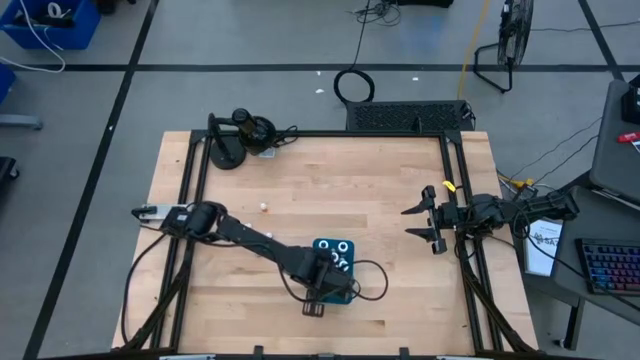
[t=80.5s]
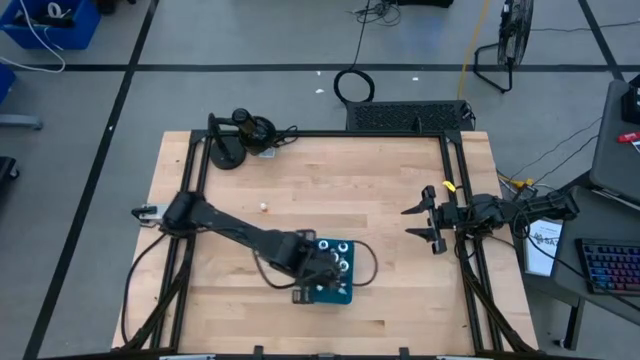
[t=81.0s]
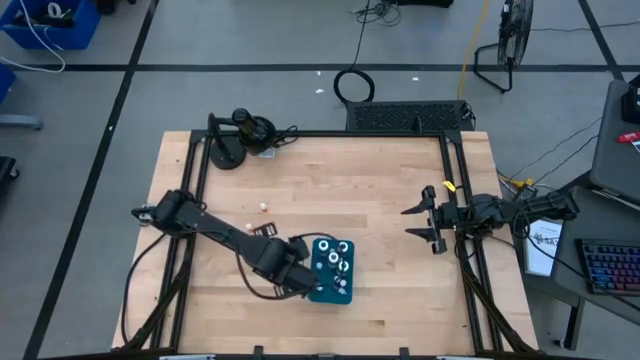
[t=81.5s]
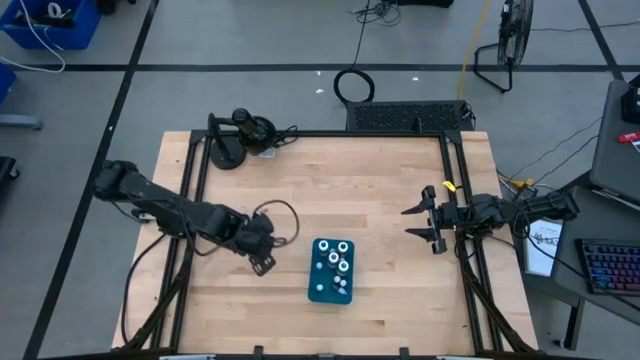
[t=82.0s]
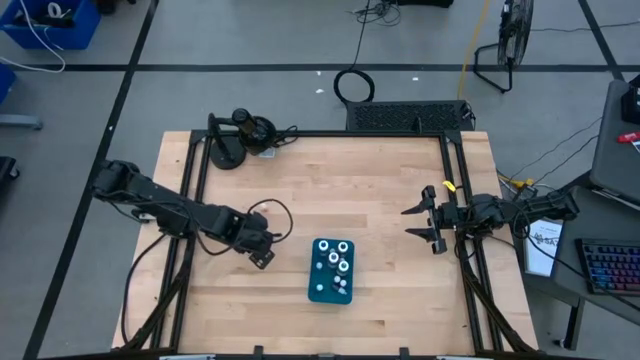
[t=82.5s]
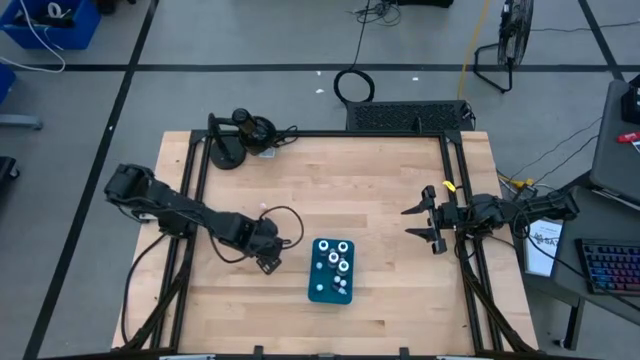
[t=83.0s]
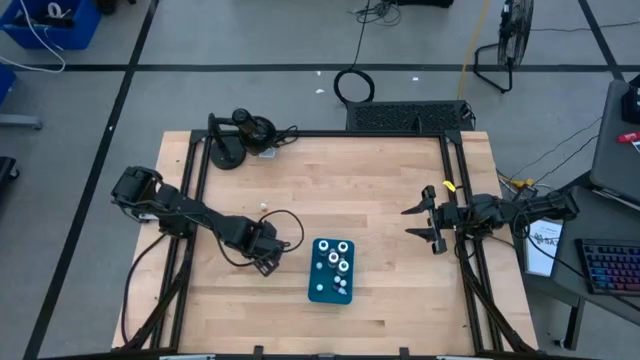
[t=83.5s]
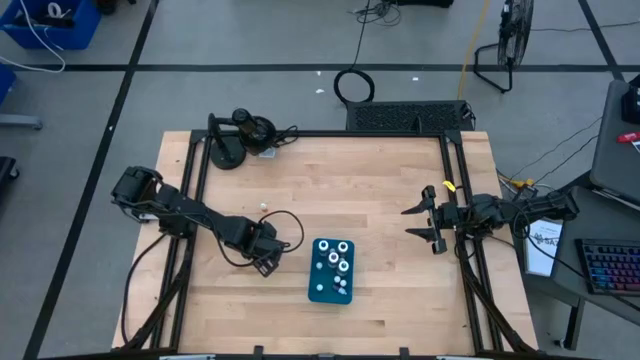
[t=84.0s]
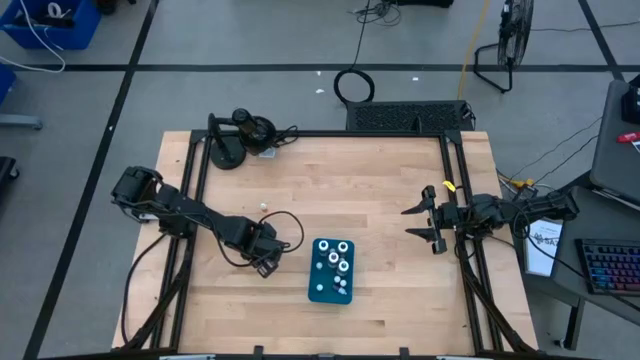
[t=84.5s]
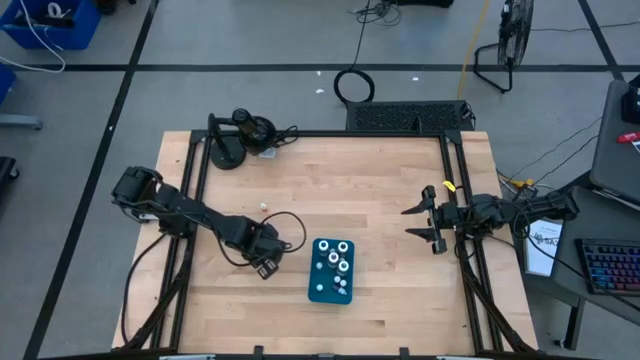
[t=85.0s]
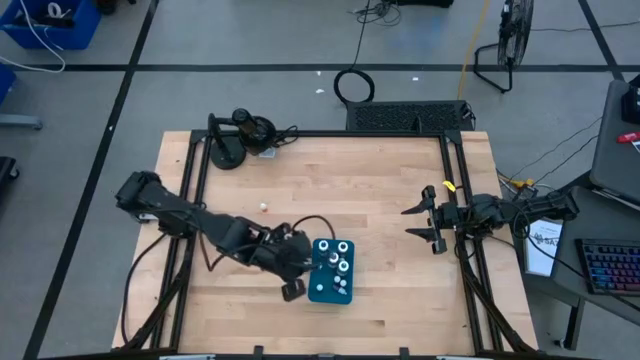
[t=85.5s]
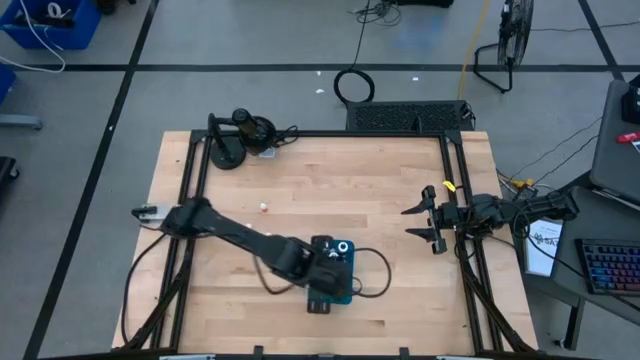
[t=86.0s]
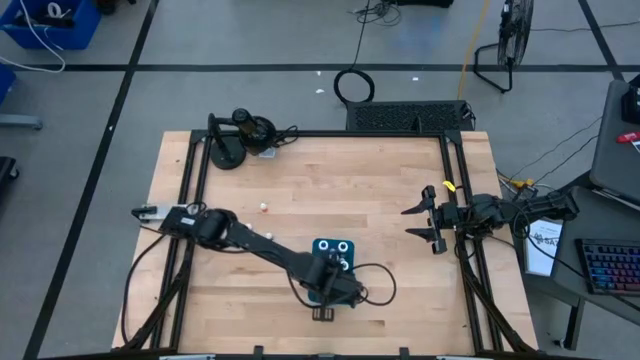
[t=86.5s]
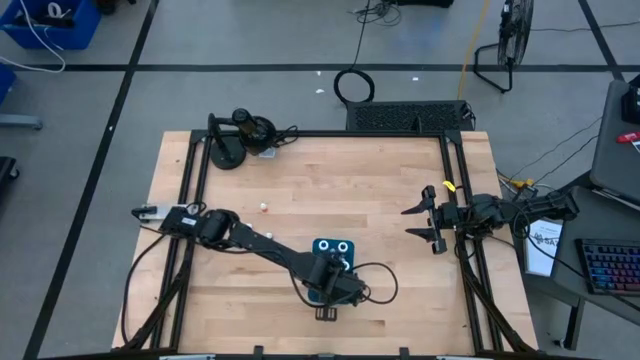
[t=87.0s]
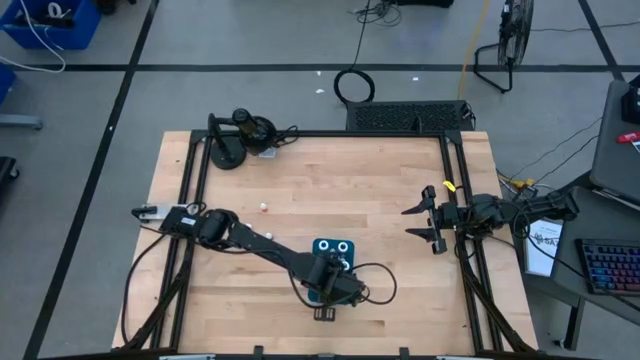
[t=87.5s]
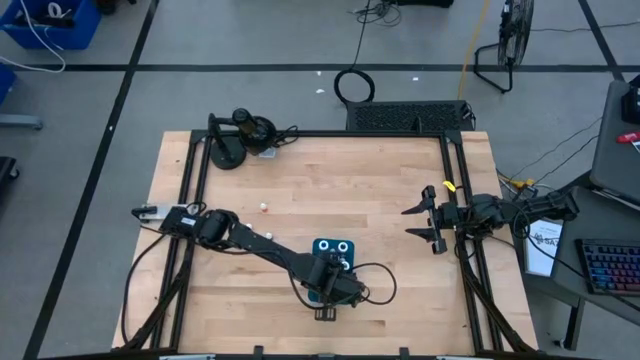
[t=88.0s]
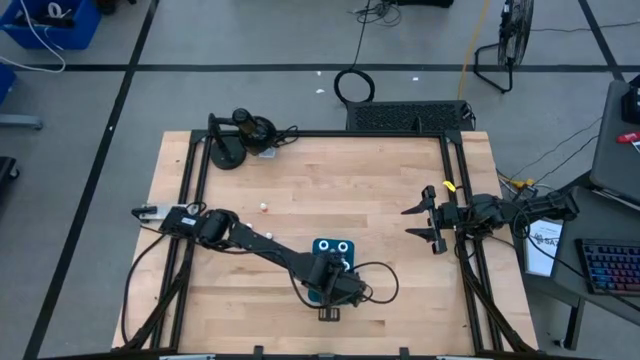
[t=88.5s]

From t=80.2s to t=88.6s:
Task: Pick & Place food coloring
Put the blue small food coloring bottle into the blue bin

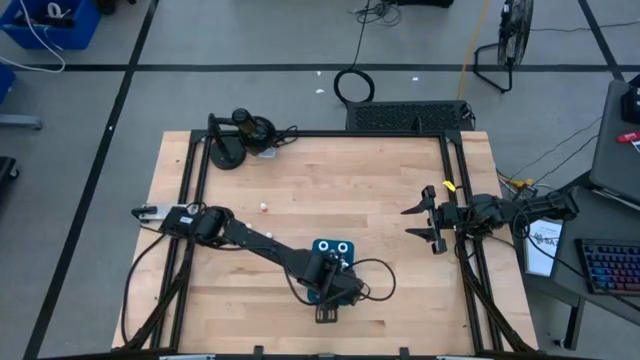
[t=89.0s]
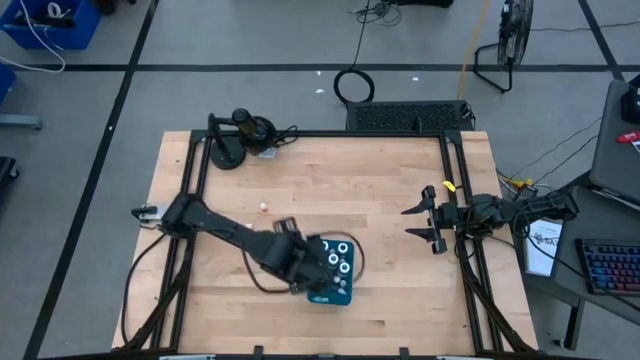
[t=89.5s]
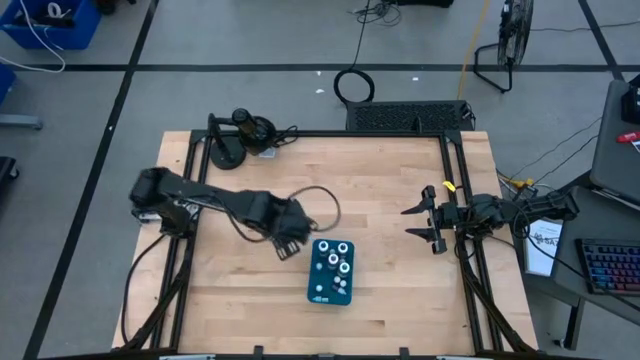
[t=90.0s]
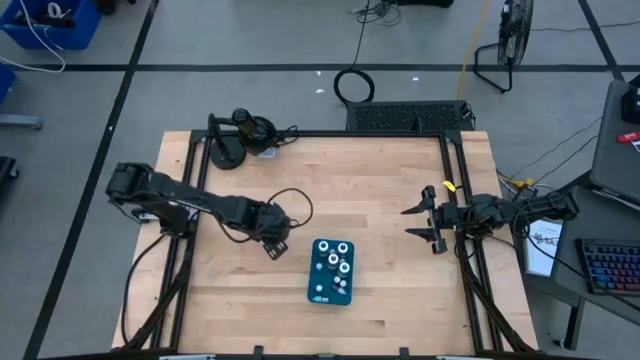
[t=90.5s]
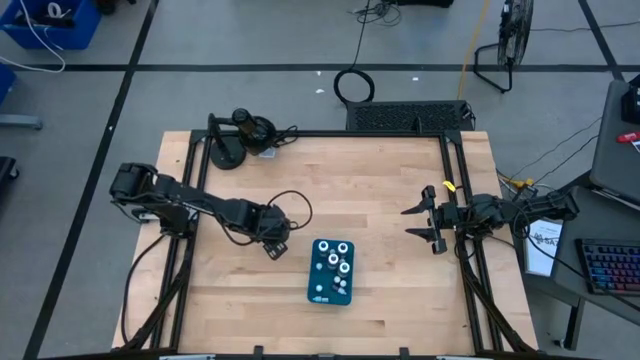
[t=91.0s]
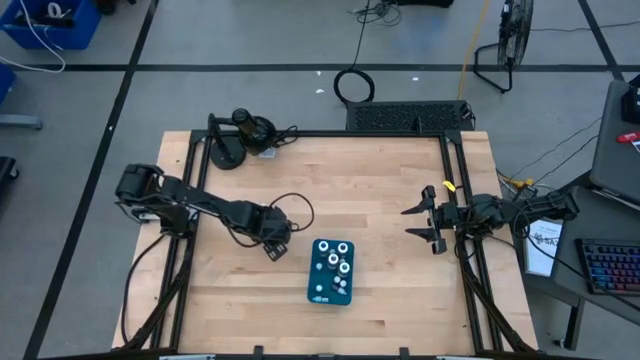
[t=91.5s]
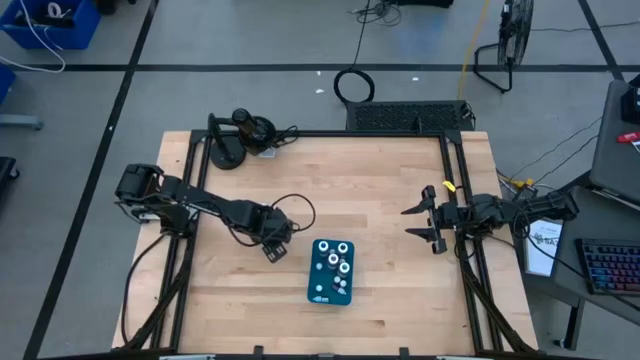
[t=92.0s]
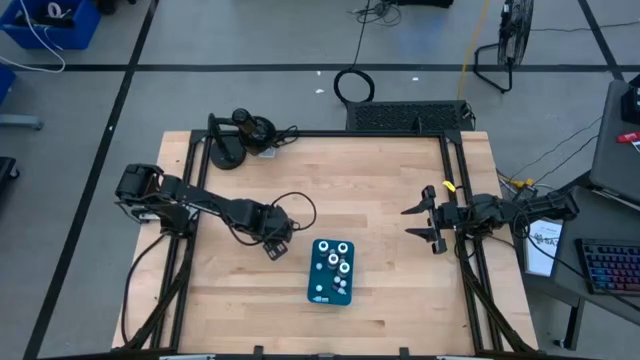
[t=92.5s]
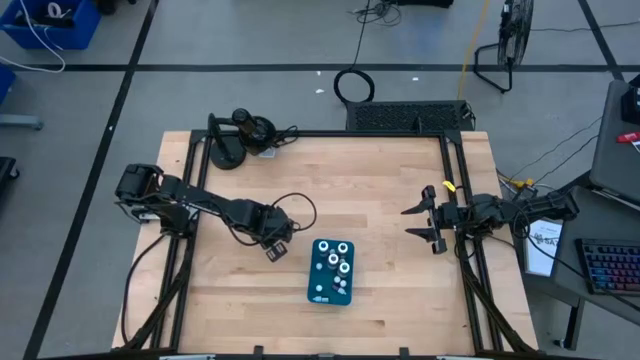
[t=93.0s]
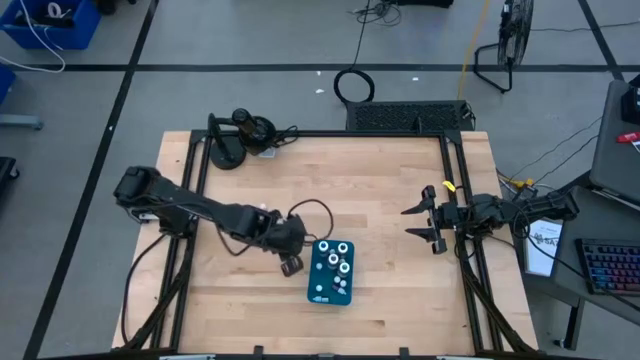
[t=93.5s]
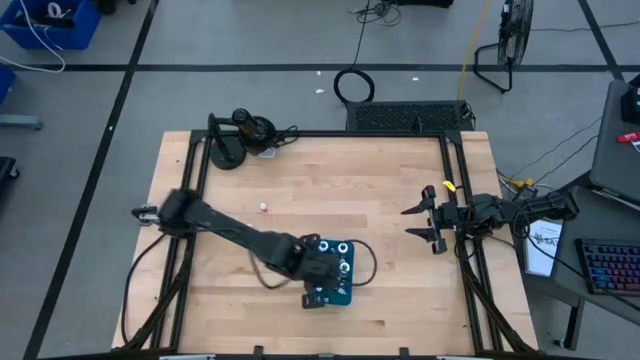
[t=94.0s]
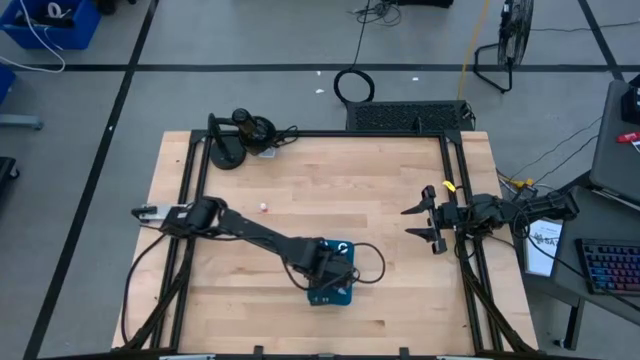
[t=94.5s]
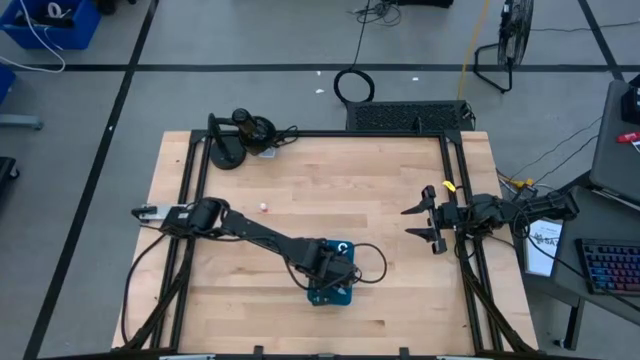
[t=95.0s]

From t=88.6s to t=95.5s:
Put the red small food coloring bottle into the blue bin

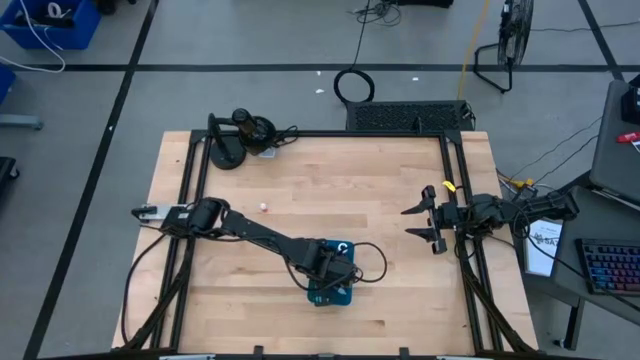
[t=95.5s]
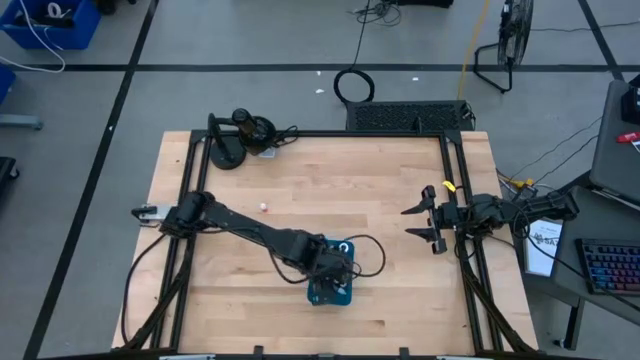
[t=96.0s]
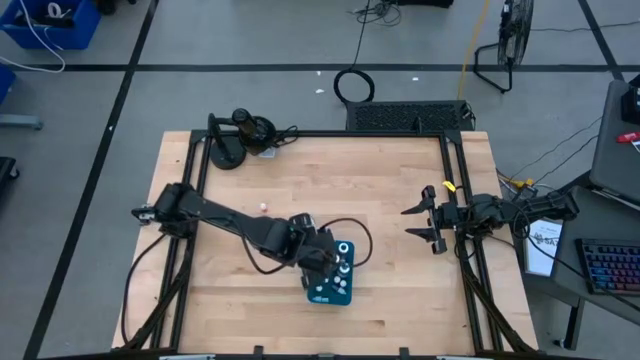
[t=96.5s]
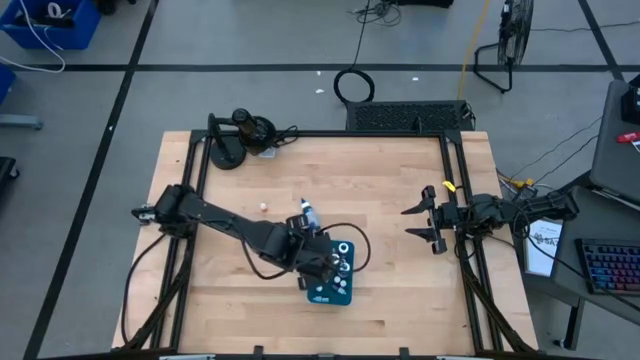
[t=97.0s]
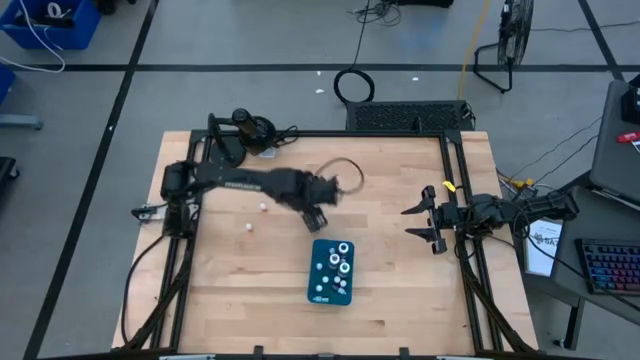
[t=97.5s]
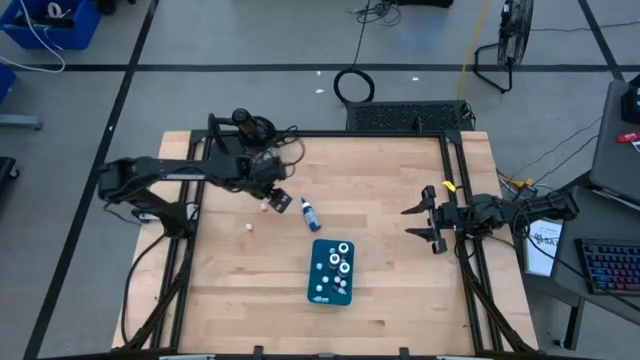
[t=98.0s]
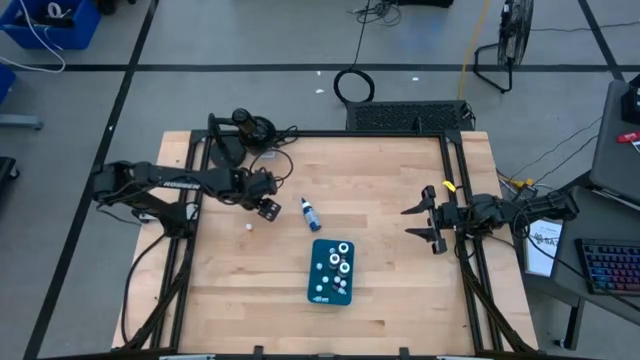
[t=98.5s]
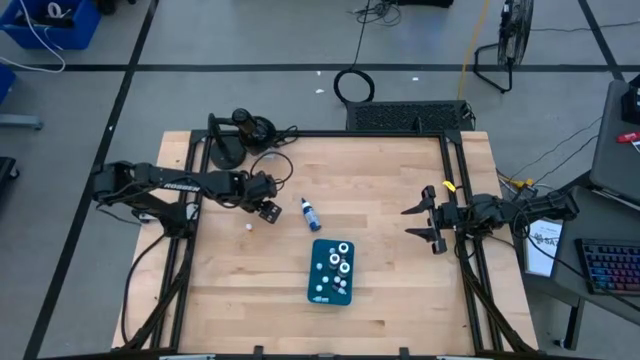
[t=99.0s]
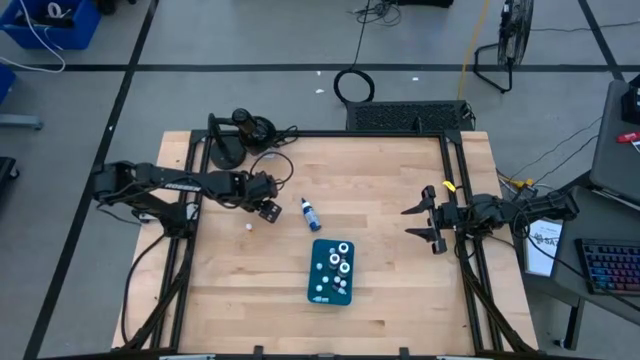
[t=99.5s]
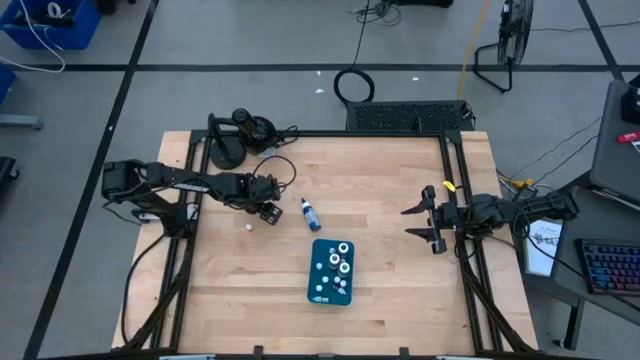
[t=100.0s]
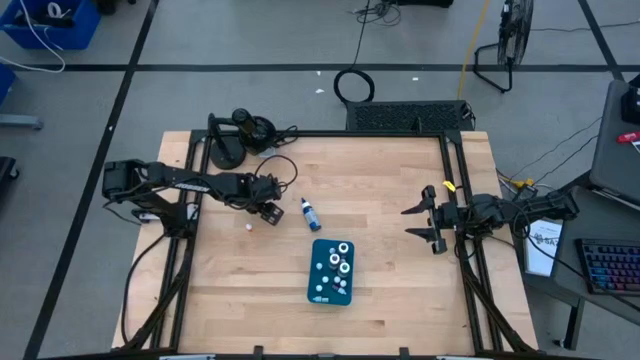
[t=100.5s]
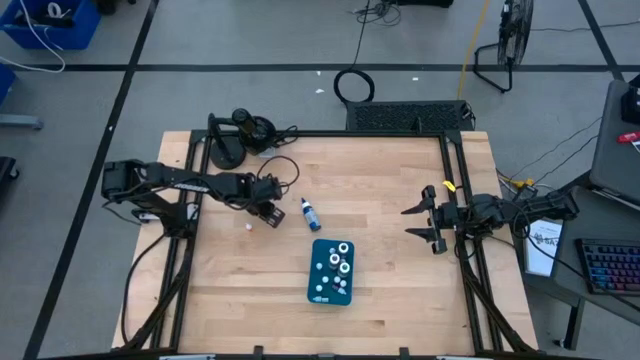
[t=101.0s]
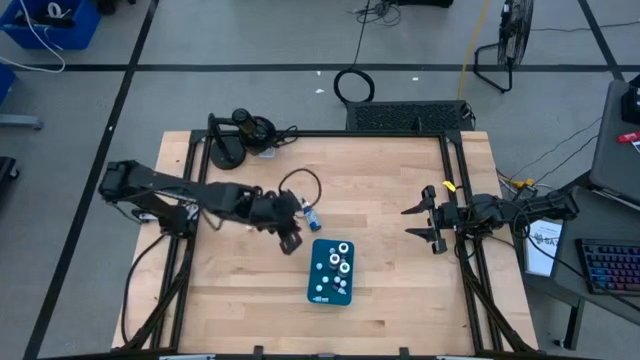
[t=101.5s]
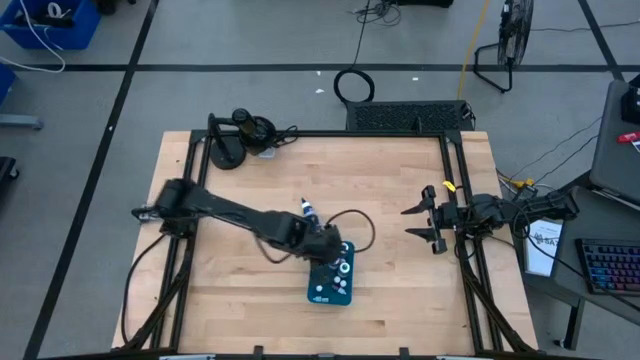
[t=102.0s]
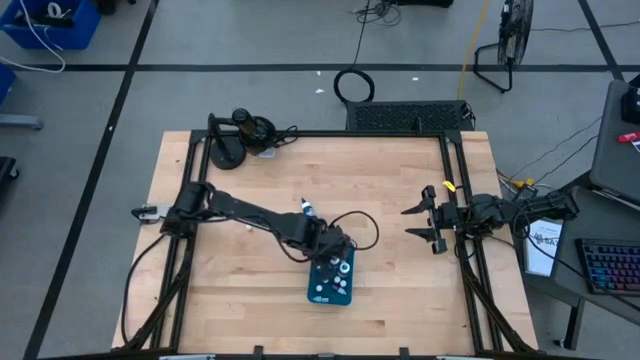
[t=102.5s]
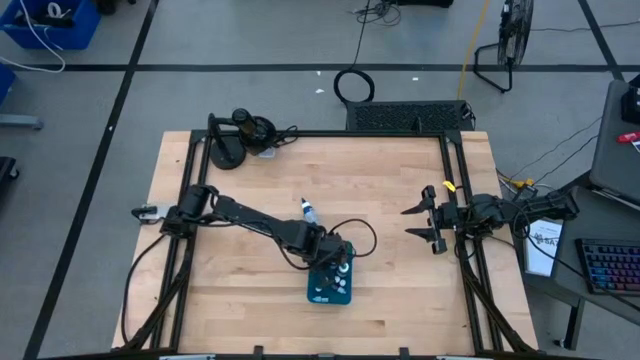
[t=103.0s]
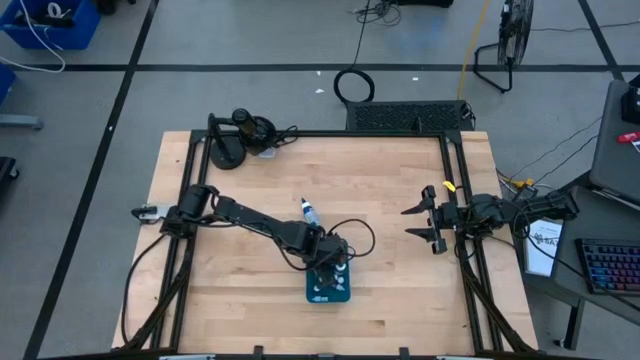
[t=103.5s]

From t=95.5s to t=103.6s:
Put the orange small food coloring bottle into the blue bin
